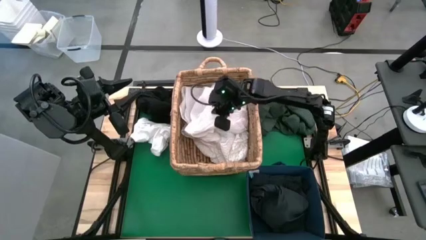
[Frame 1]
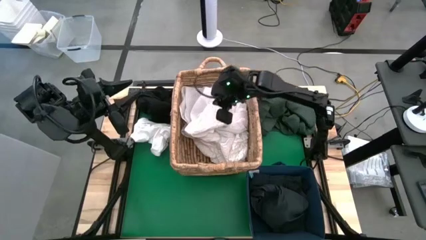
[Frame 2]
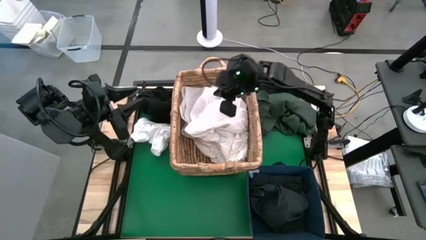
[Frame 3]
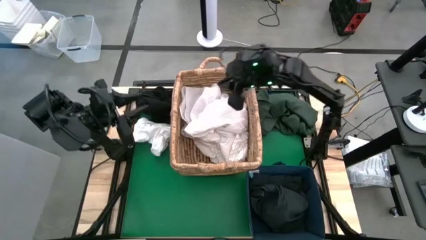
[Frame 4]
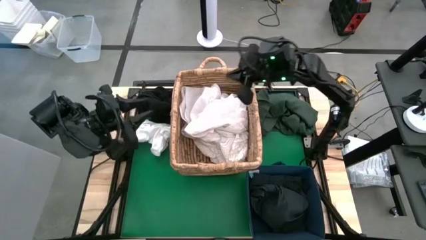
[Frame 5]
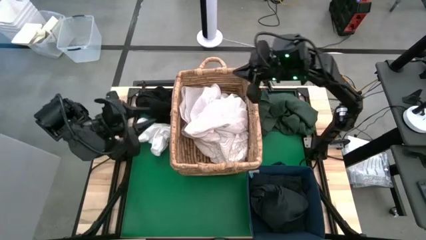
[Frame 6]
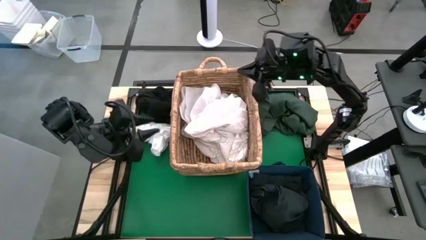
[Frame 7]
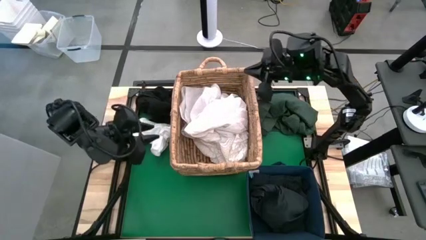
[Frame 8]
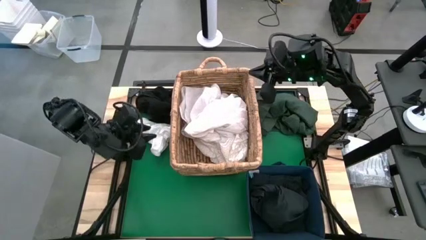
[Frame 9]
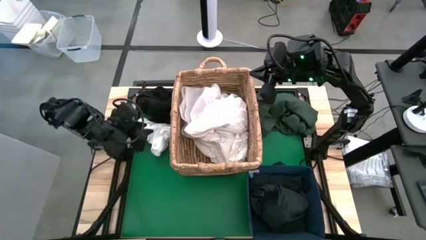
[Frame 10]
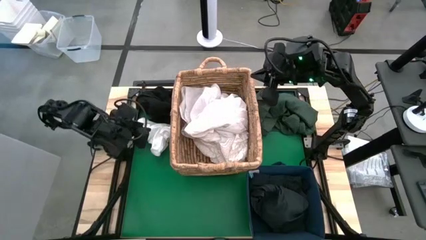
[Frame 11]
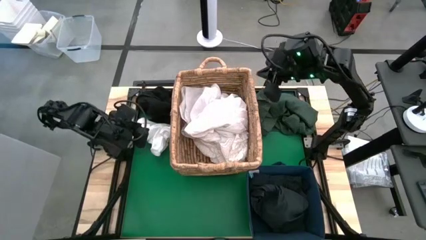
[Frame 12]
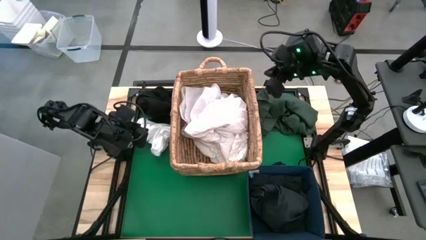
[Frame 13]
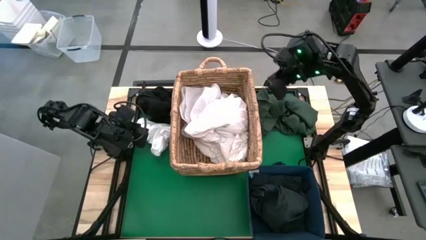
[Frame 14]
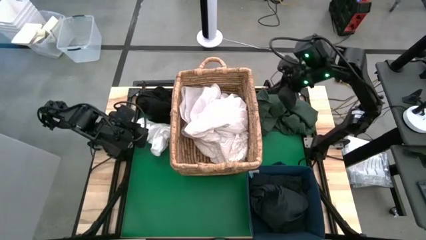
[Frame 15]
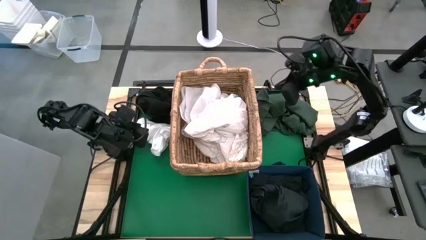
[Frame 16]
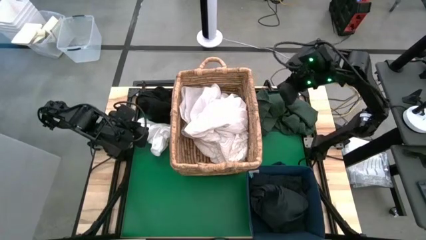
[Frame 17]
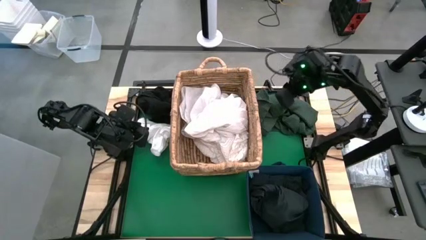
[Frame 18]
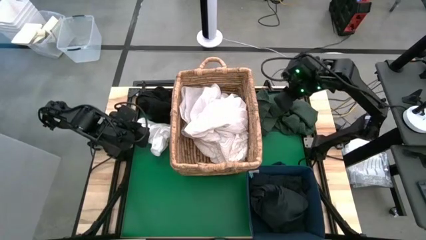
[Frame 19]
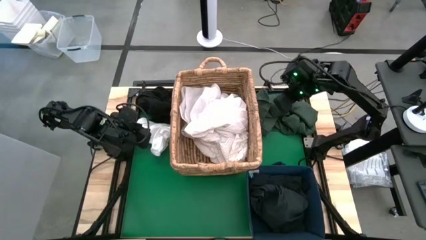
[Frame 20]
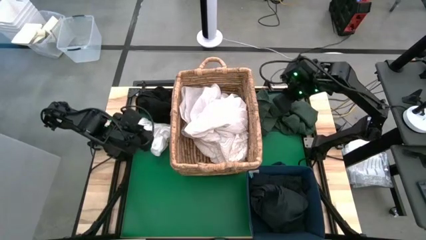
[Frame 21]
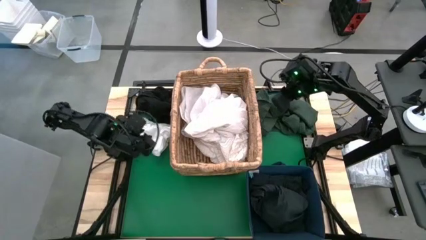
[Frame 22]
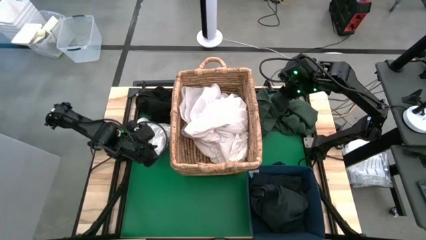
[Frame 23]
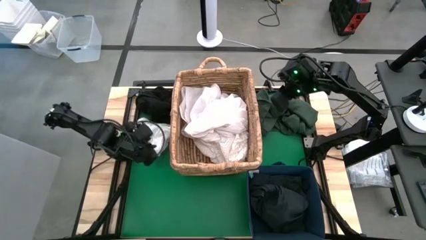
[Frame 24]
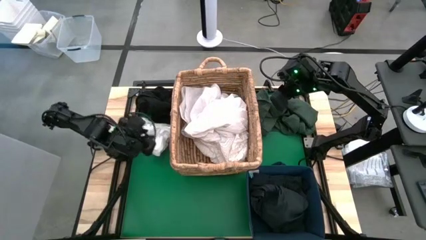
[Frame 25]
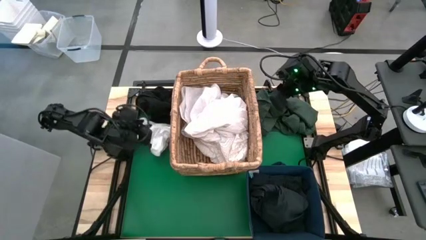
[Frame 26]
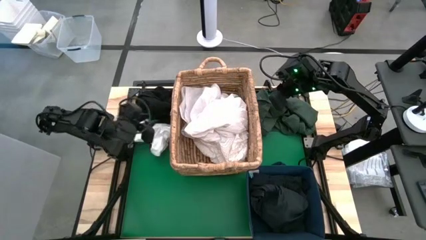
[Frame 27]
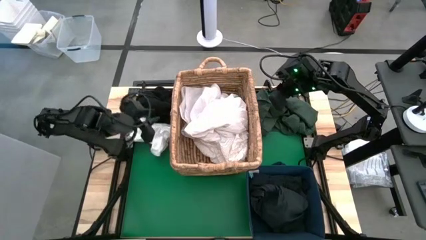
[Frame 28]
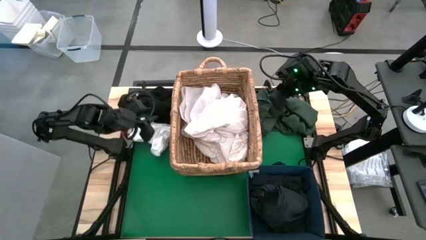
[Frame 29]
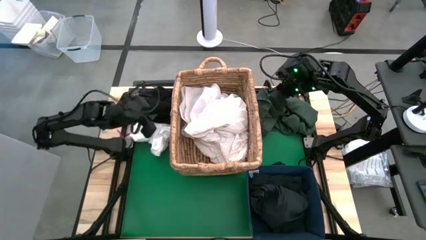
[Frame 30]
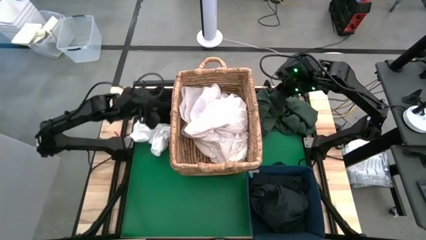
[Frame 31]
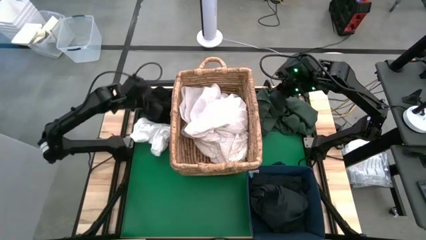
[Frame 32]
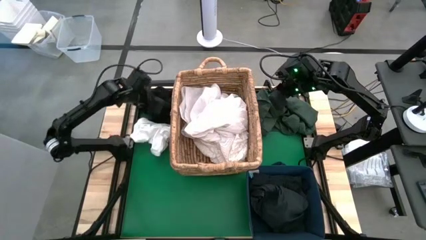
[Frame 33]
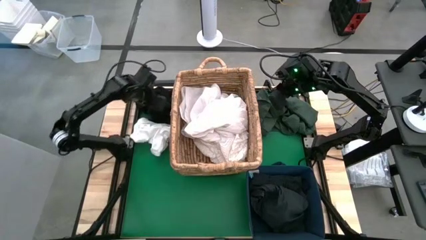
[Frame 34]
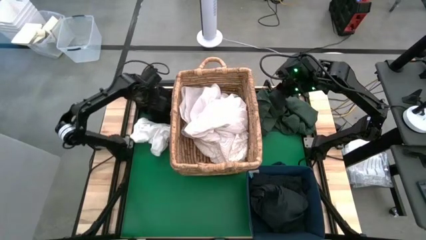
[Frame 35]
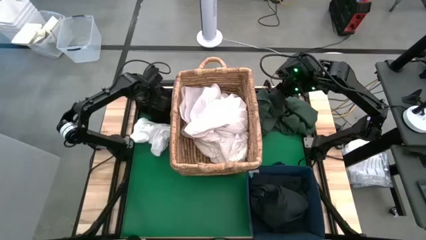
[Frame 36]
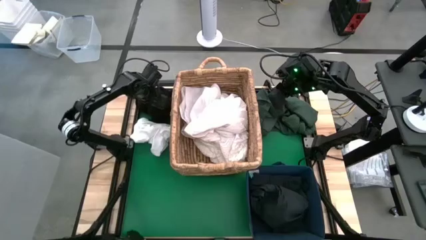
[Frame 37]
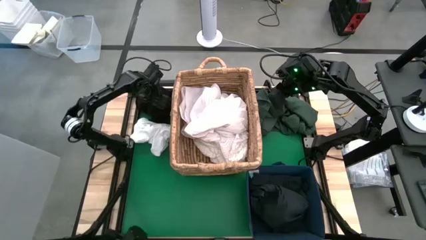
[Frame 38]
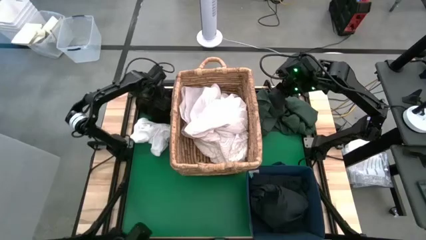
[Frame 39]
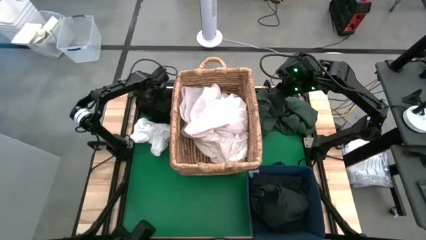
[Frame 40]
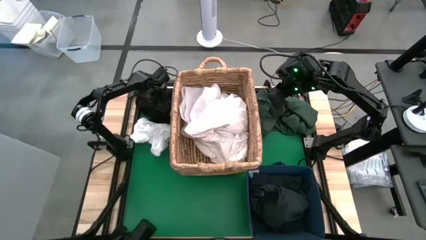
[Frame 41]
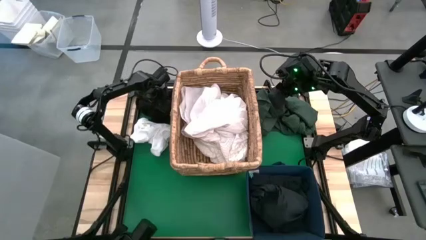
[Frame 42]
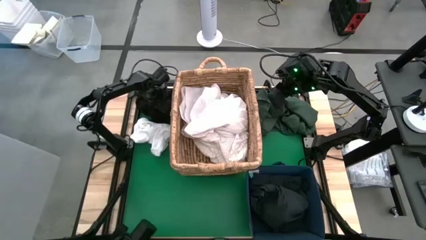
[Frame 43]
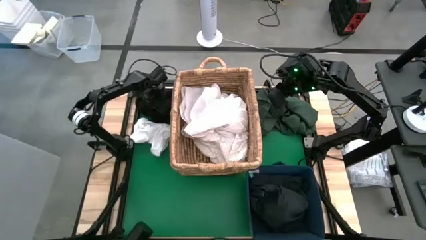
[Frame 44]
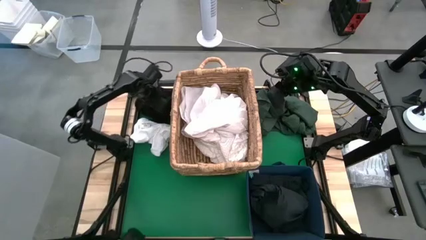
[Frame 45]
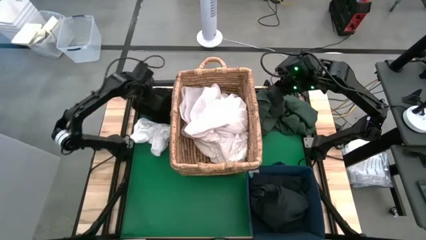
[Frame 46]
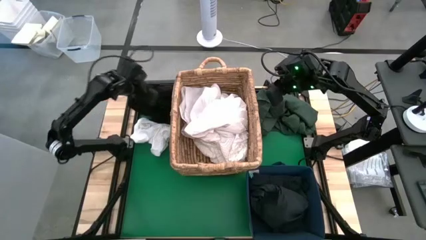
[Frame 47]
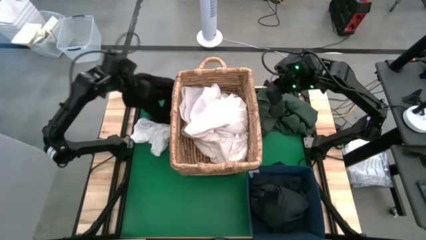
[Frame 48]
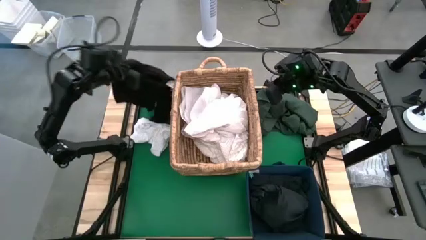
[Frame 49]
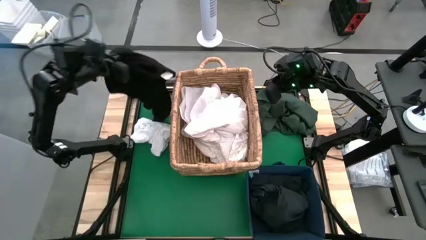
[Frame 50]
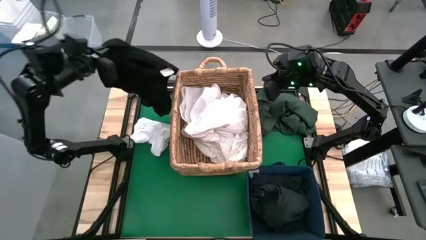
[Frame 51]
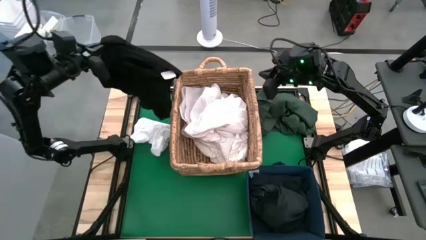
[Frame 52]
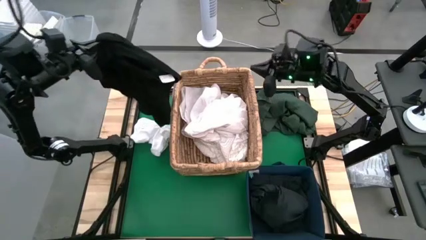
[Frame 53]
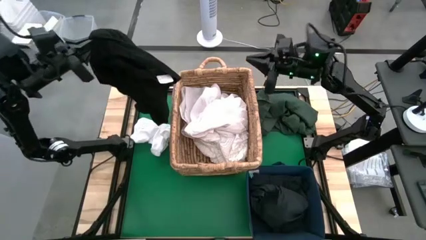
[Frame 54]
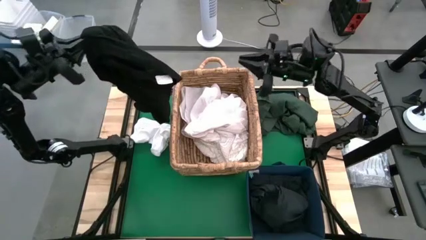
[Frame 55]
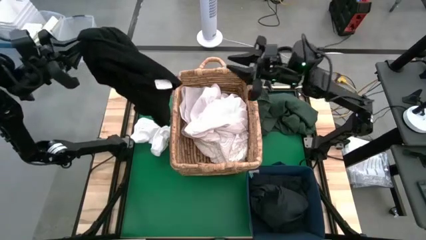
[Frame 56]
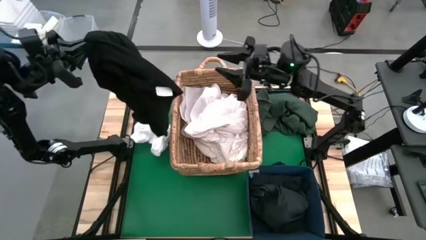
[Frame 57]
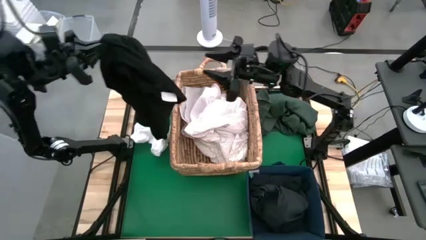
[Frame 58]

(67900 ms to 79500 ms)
Put the black sweater into the laundry organizer

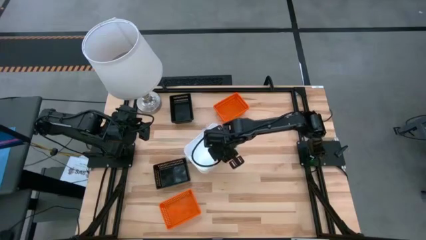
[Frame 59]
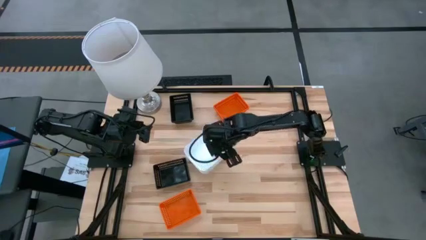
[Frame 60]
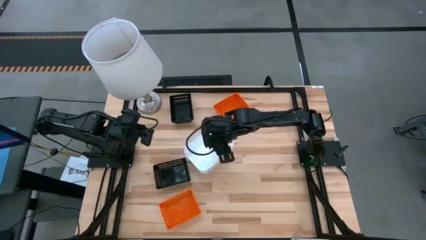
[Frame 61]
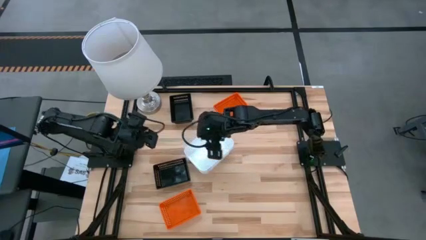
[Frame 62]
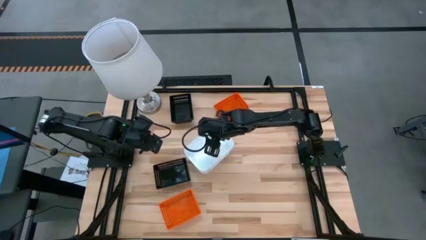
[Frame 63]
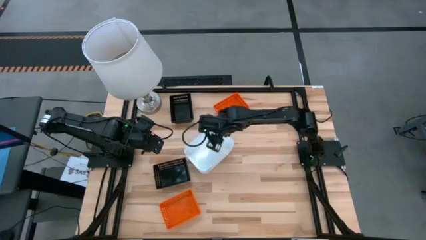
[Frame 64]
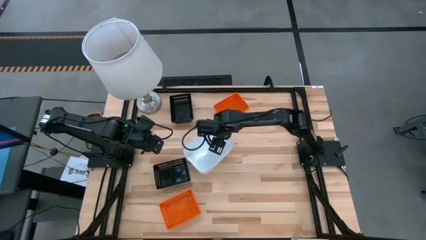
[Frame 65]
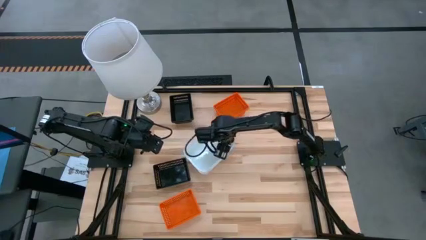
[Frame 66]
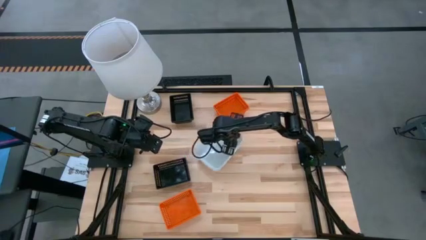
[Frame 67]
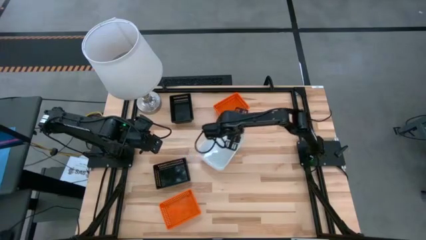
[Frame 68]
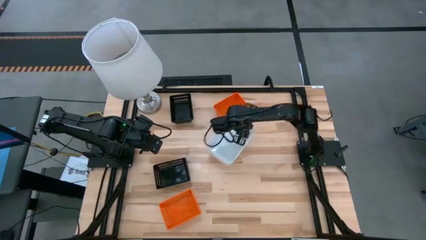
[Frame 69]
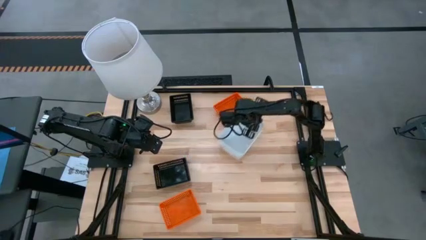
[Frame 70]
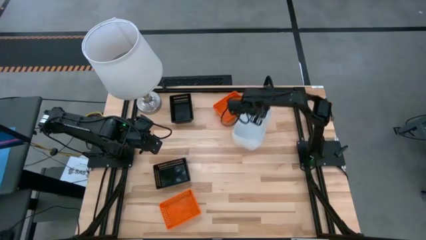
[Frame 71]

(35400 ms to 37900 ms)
Move the stacked bins to the top

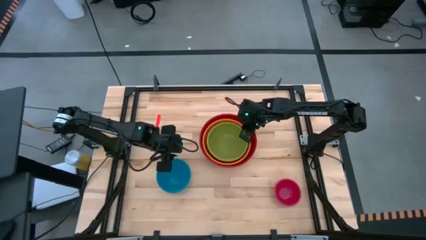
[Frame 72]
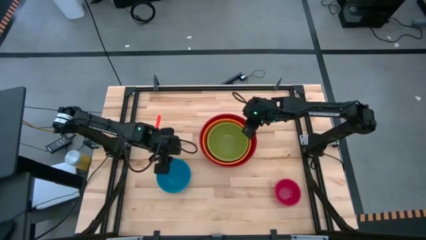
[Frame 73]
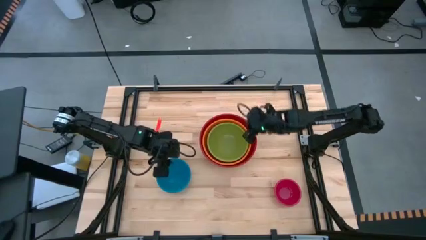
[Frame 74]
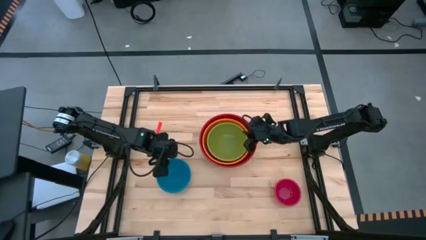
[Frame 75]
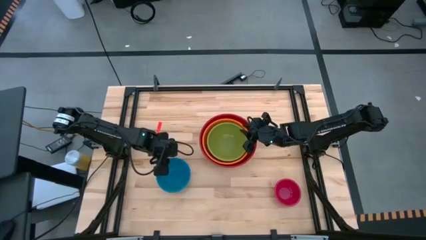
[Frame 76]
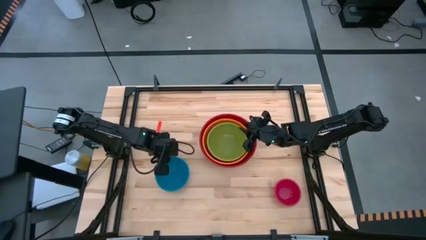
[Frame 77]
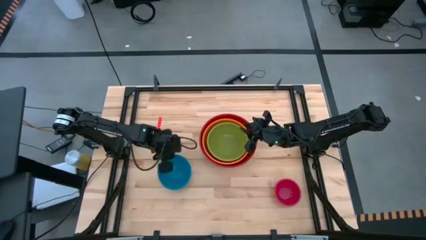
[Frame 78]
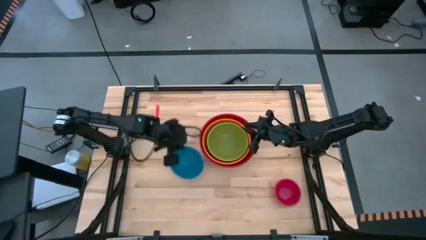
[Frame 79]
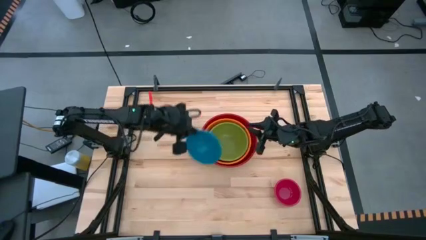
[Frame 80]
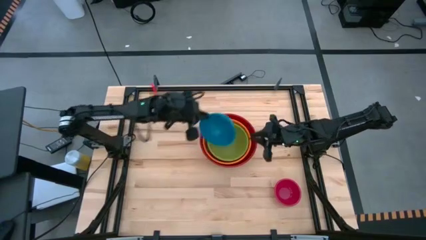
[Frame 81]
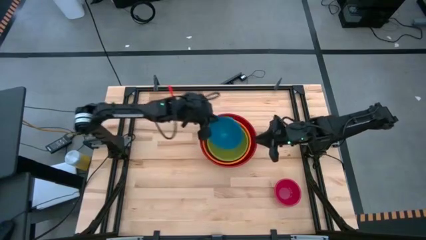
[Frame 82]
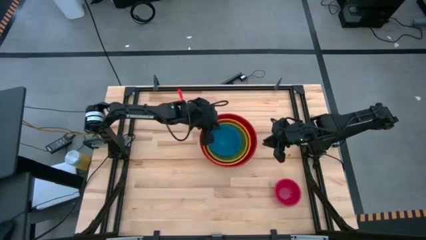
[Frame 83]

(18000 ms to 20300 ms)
Stack the blue bowl on top of the green bowl

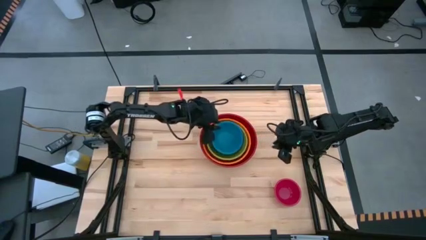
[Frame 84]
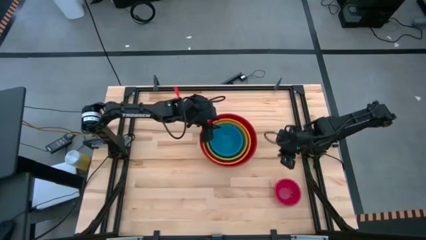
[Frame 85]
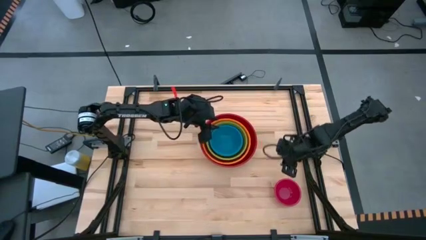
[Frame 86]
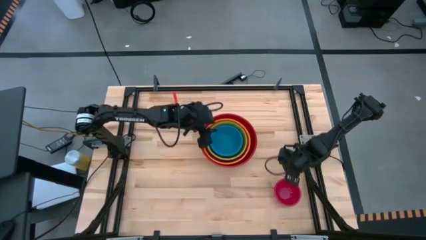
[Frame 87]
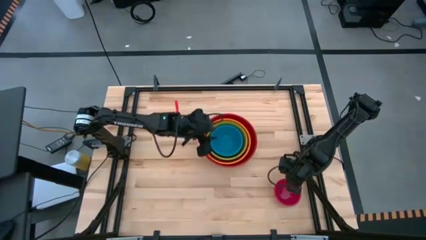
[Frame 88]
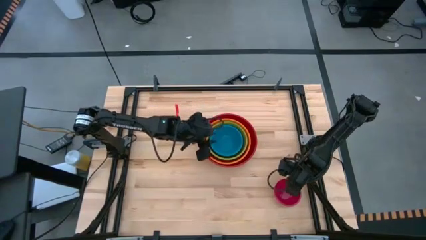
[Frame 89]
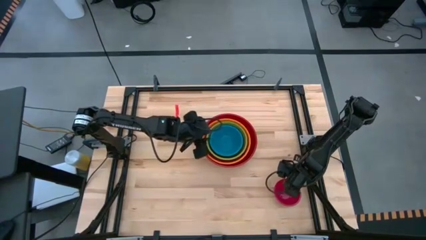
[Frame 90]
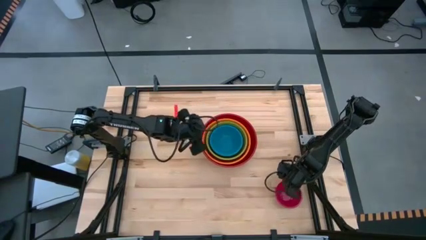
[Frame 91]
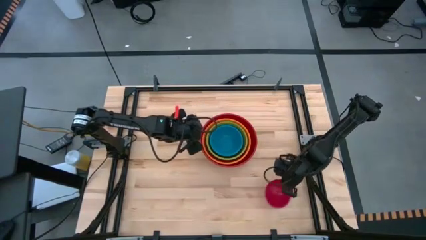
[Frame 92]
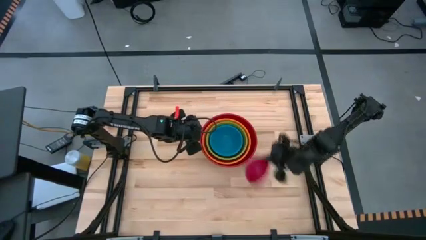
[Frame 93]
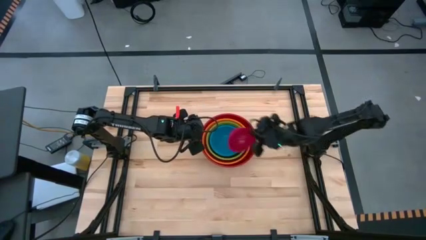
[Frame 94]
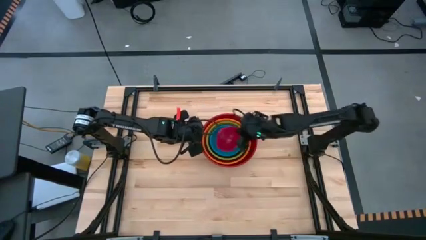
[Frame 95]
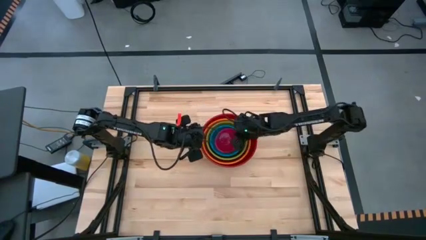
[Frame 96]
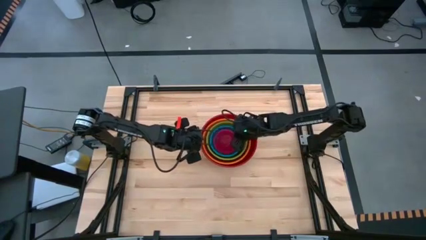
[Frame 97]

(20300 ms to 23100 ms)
Stack the pink bowl on top of the blue bowl
